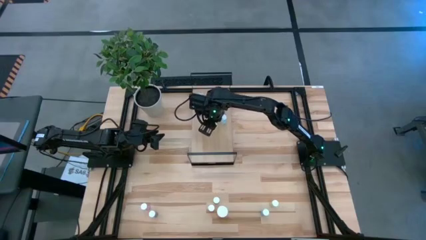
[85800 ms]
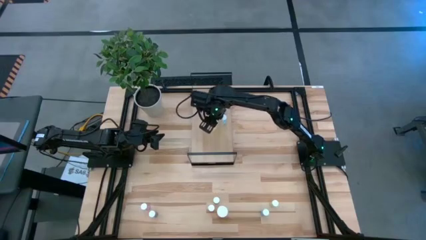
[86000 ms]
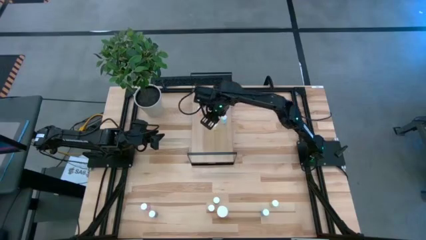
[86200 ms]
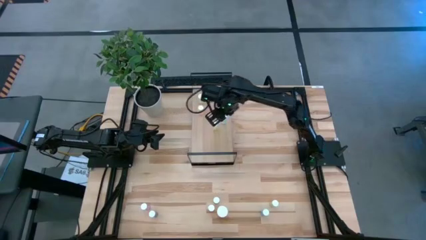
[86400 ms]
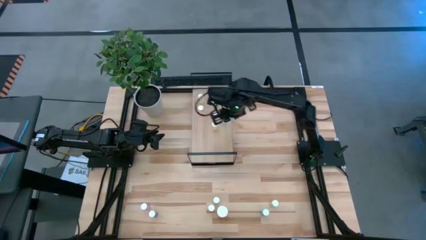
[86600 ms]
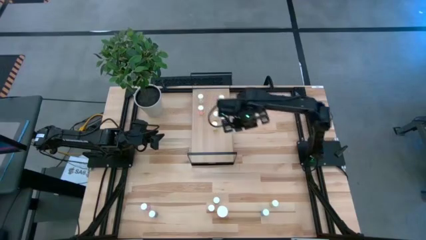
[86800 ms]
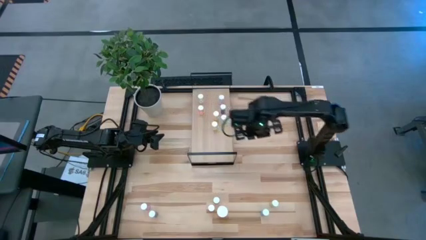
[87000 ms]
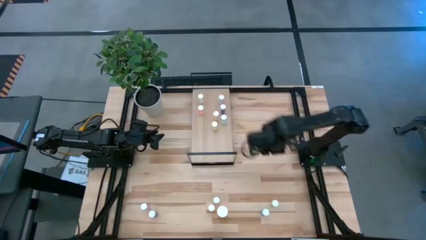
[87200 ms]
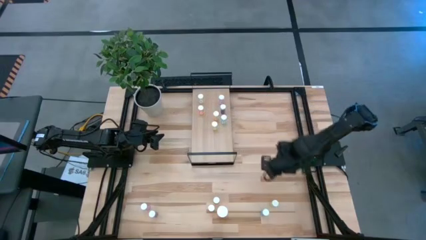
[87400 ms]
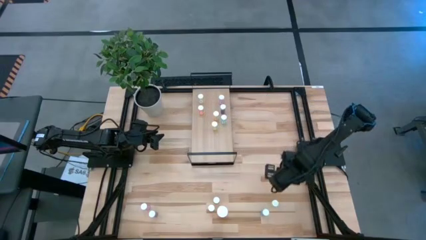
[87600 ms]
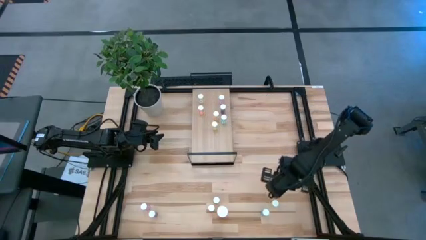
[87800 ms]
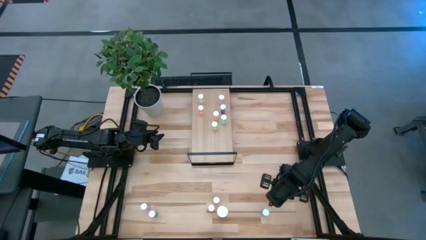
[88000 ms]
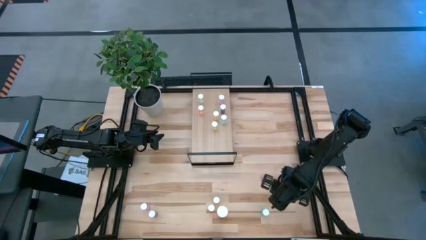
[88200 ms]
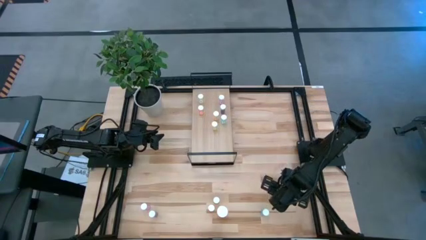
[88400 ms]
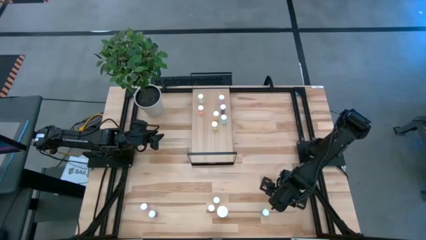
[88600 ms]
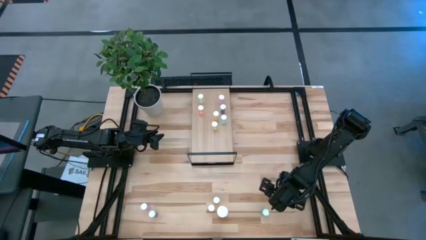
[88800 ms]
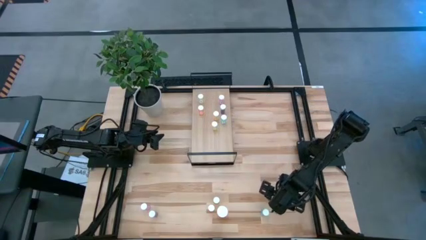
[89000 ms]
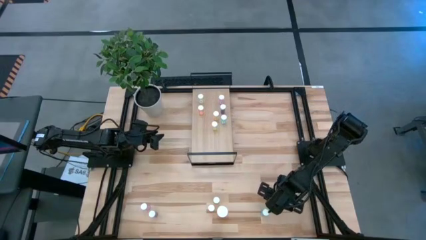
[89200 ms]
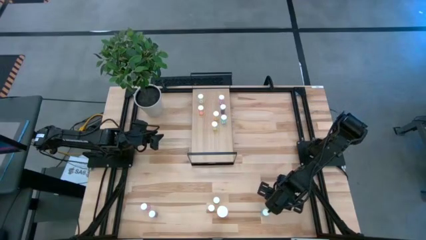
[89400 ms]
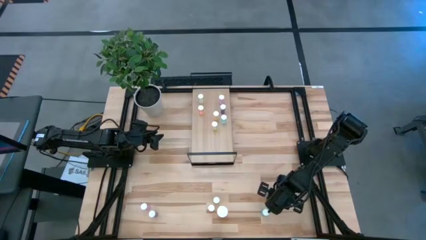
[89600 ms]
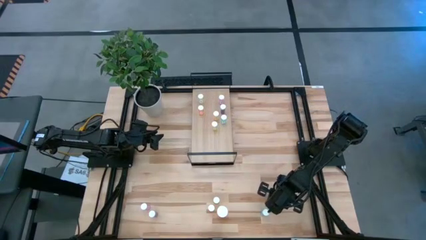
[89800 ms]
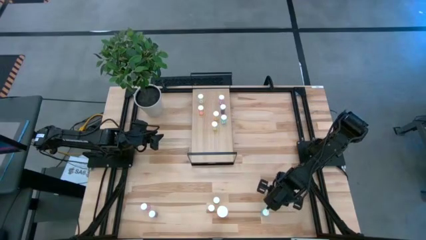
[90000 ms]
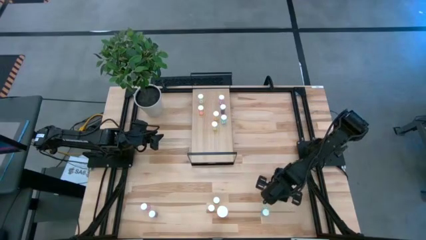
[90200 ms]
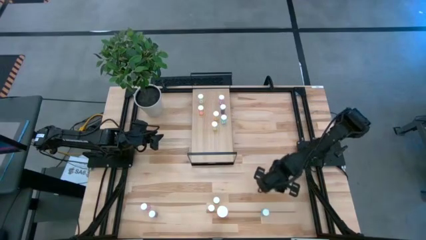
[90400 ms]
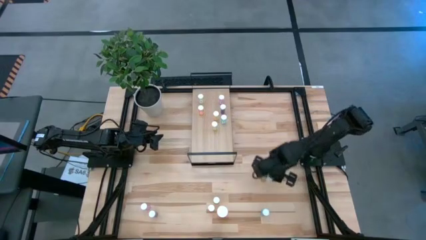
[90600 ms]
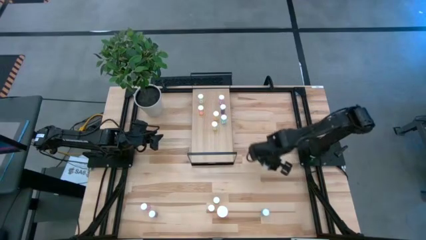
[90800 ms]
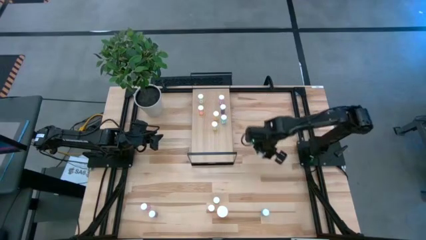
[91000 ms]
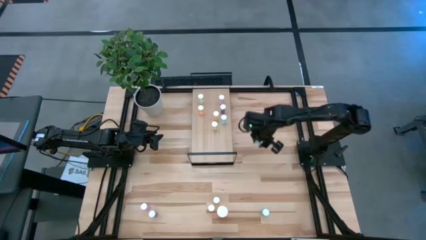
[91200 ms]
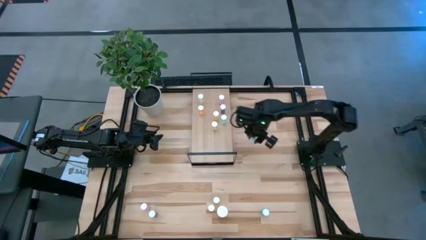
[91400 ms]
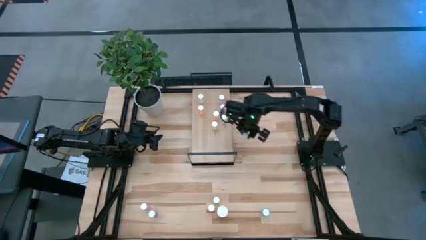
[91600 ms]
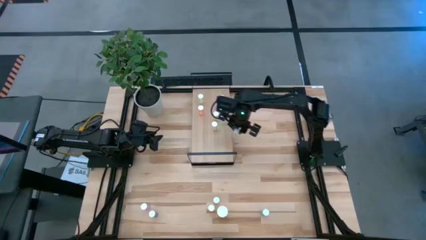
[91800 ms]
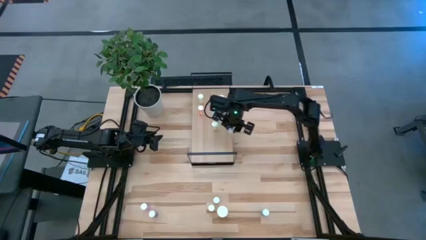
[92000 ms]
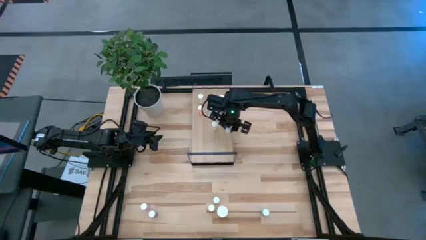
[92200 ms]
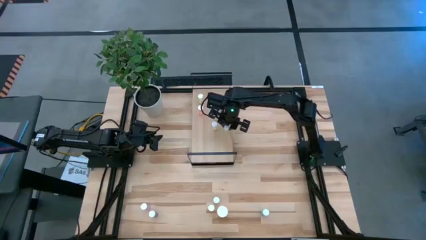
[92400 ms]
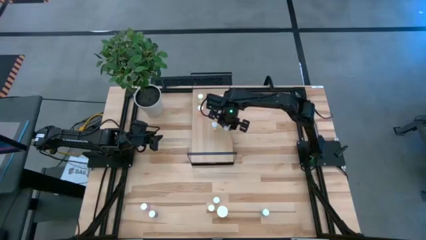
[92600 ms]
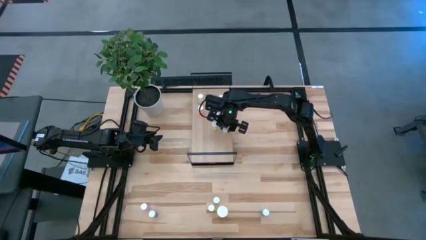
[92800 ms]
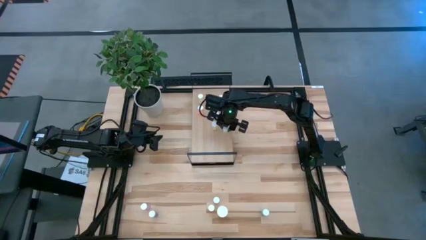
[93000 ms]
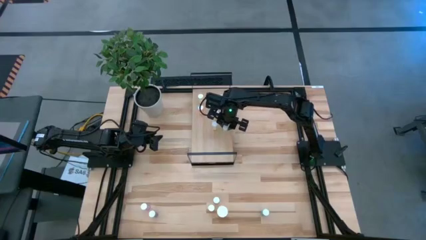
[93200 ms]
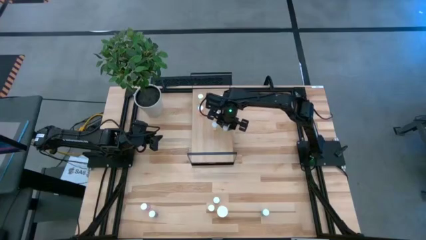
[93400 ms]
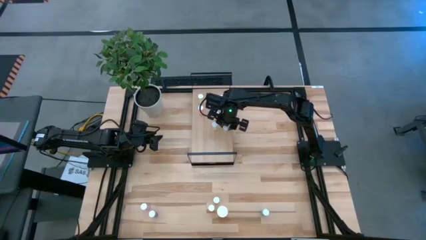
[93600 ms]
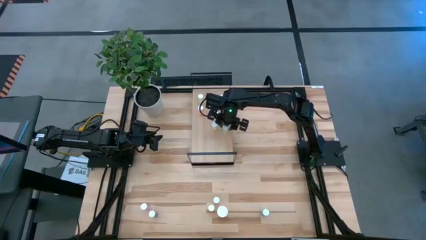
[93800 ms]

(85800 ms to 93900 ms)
Task: Pick and place medicine bottles onto shelf by color
Put the yellow pill bottle on the shelf

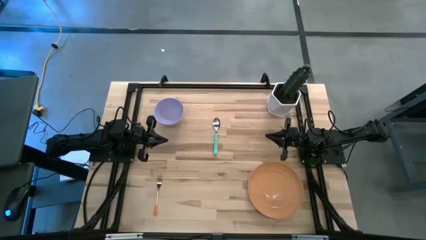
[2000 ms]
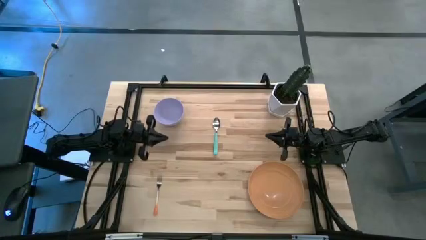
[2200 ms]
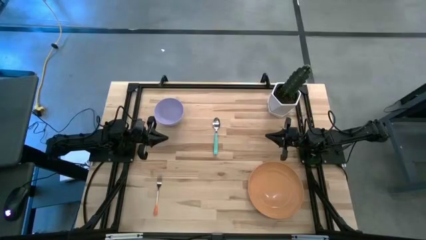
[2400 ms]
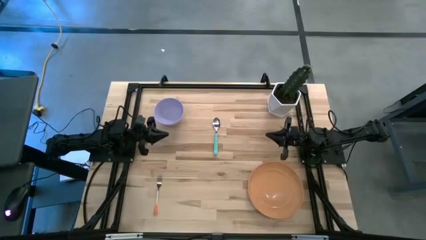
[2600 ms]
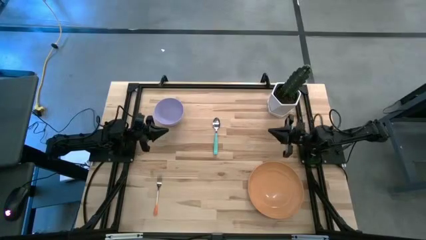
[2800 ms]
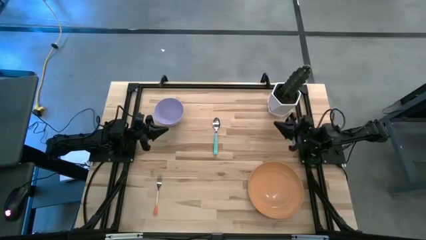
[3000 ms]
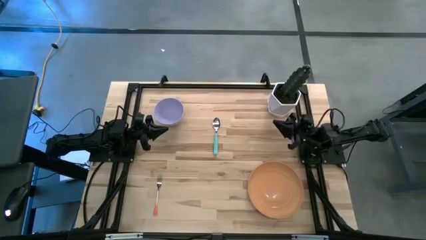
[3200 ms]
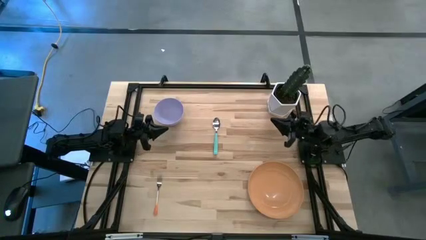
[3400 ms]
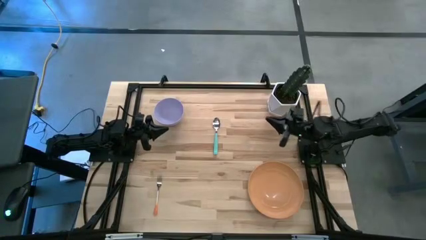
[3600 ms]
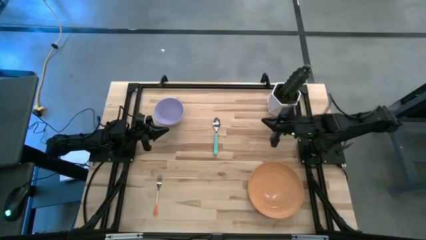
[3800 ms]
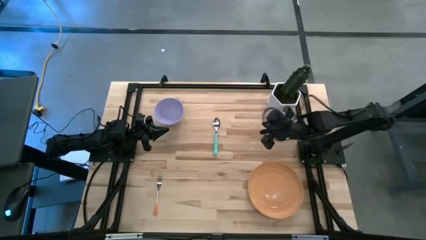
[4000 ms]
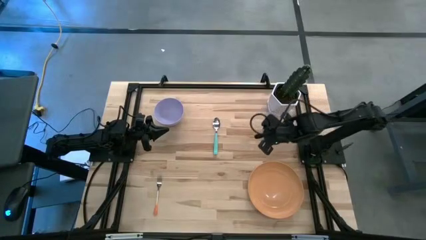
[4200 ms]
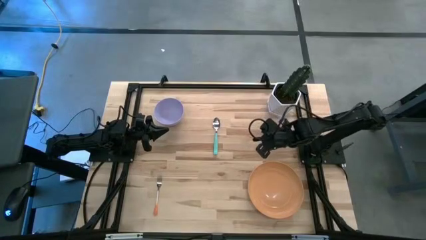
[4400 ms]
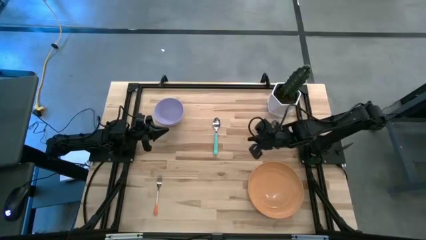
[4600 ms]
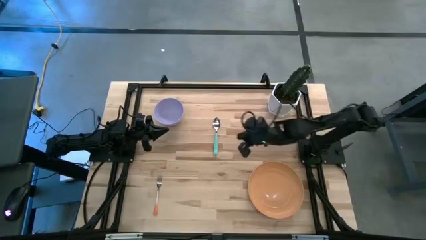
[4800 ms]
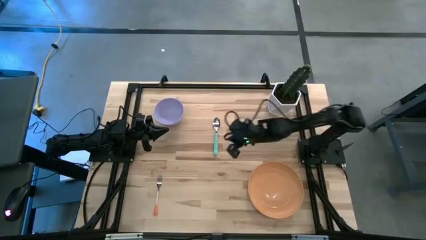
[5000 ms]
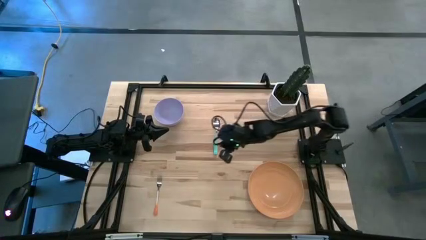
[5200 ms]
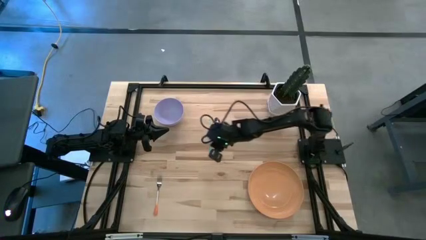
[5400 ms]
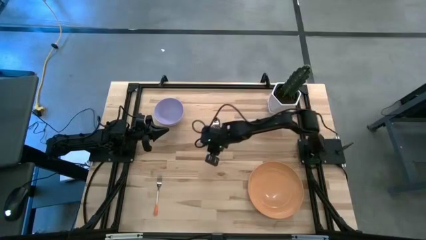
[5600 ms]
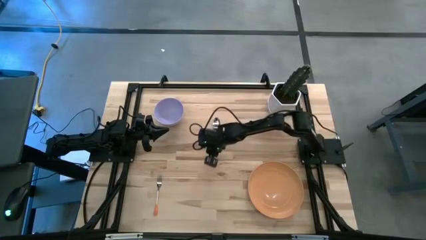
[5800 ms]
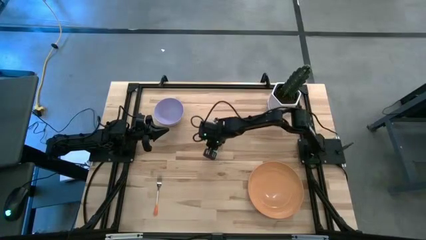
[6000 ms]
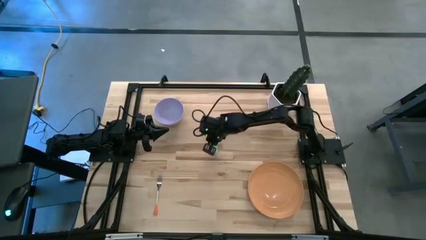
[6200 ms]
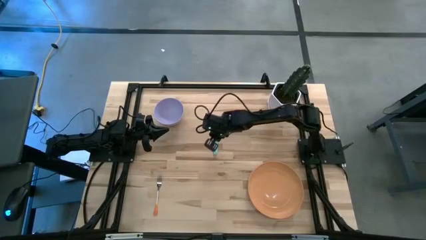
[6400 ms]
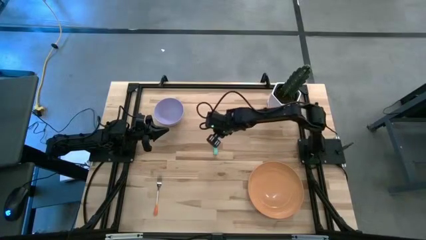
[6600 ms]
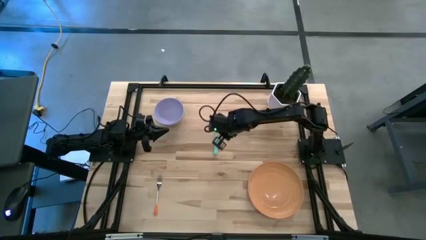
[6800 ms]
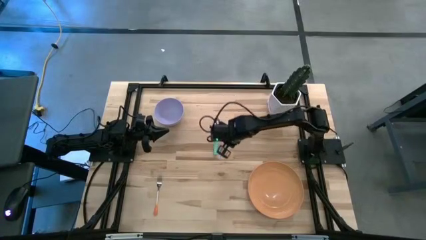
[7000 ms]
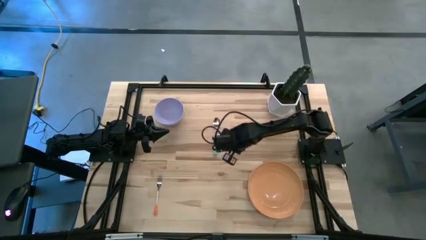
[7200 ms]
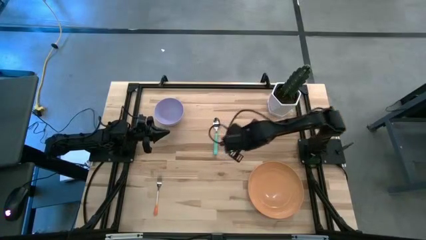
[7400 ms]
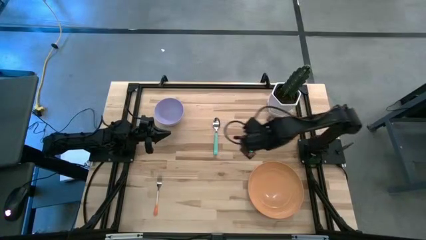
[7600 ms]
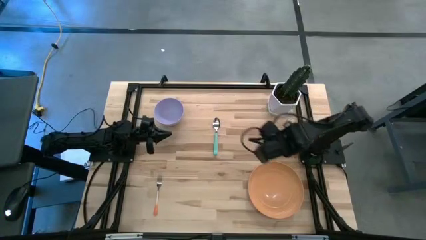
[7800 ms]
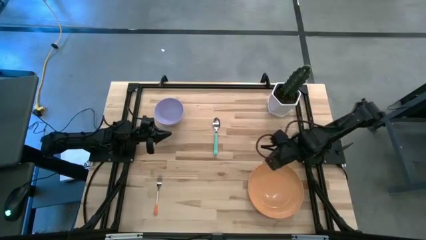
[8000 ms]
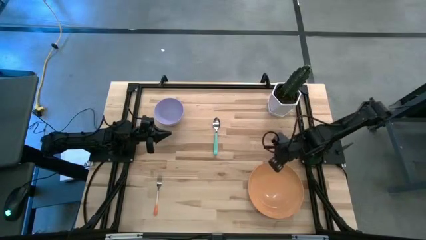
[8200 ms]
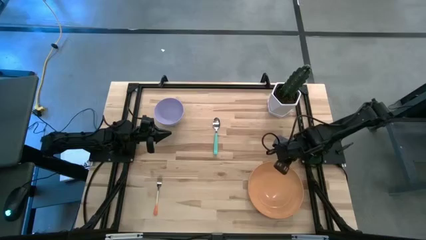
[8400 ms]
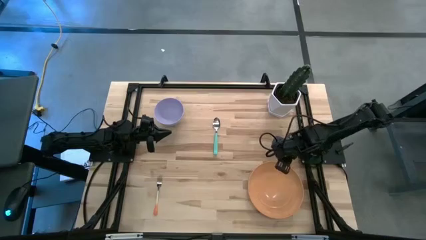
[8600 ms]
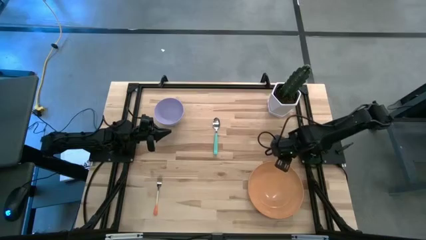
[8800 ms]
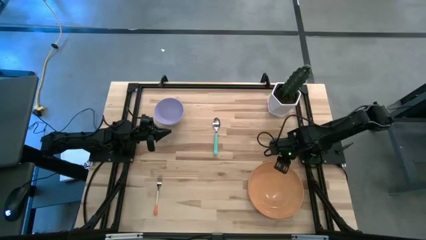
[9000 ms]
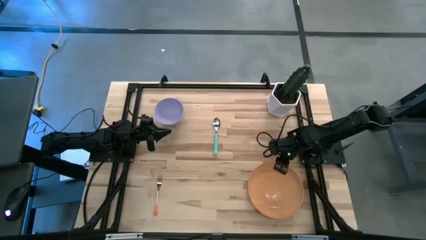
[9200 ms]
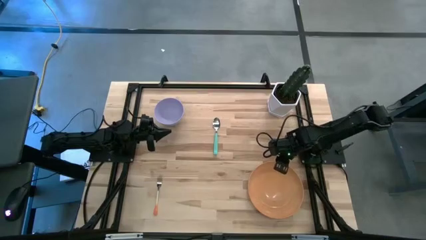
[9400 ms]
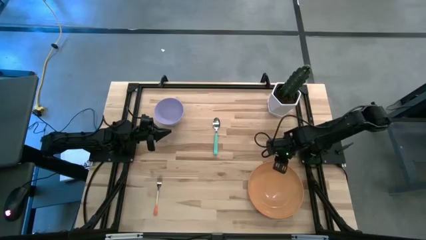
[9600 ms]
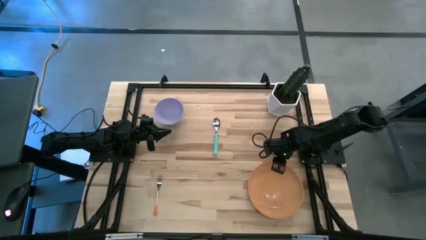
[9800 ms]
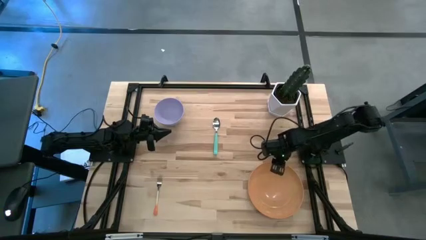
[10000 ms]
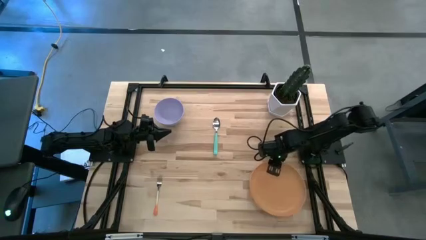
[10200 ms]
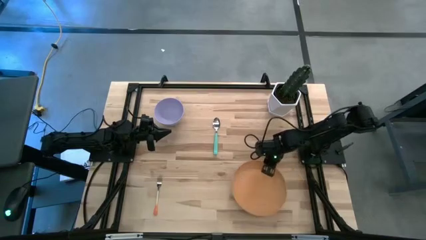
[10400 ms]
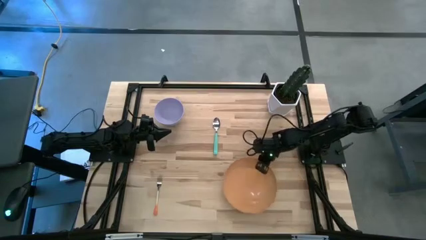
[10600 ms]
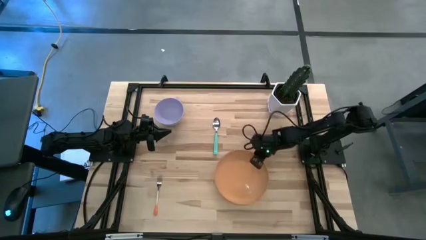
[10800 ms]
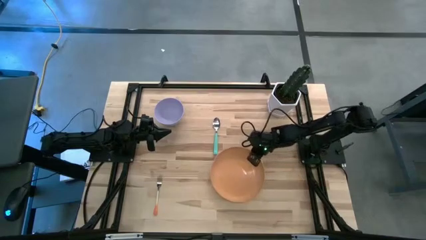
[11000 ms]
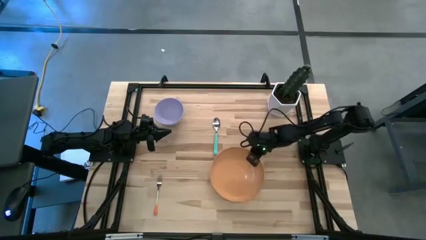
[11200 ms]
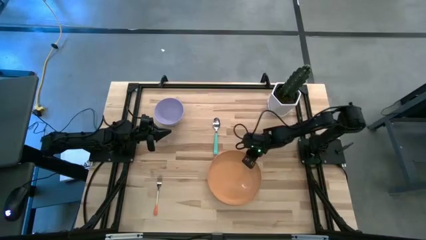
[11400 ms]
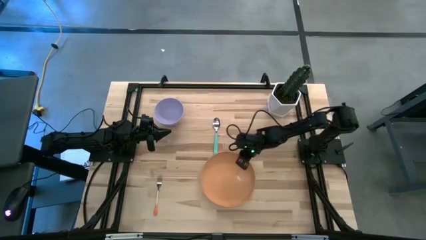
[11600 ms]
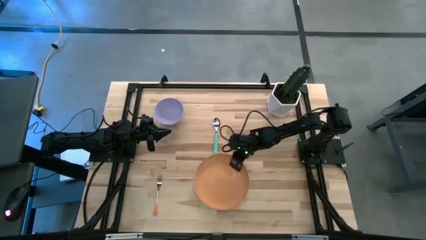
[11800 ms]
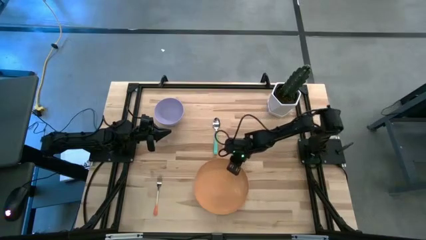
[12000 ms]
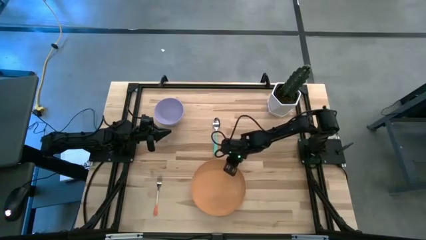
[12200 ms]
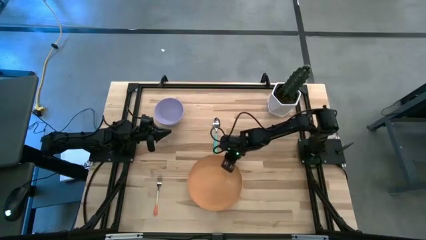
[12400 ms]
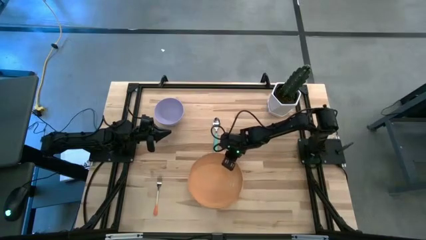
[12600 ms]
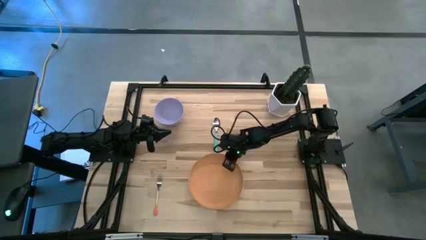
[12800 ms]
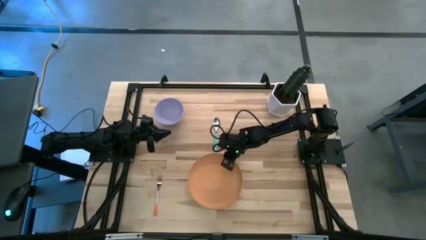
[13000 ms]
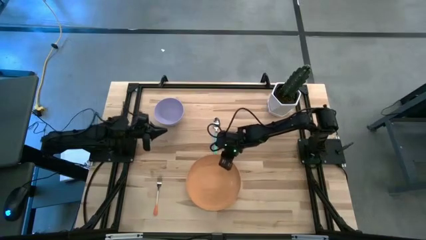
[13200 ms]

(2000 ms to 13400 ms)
Task: Set table place
Move the orange plate to the bottom center of the table
